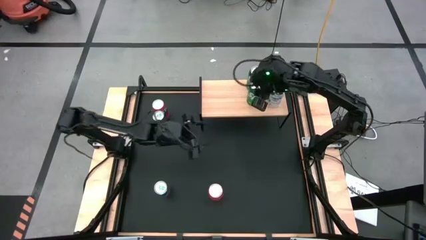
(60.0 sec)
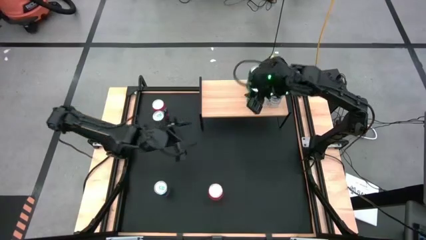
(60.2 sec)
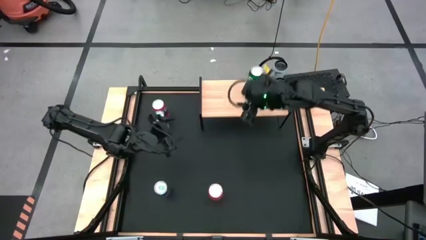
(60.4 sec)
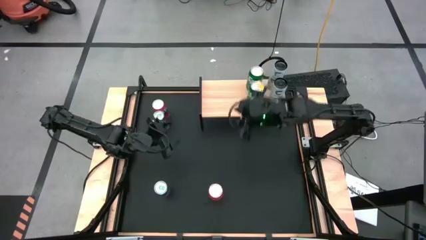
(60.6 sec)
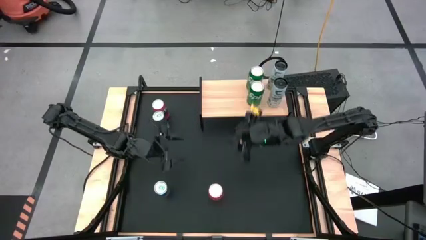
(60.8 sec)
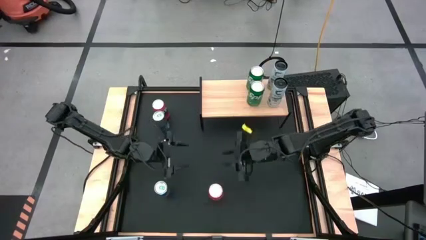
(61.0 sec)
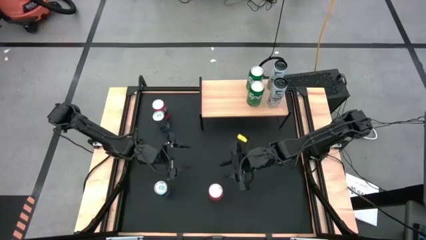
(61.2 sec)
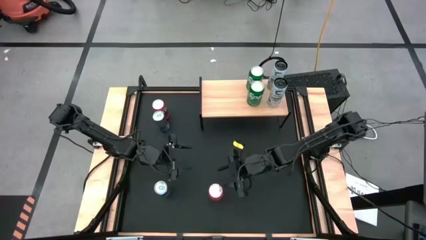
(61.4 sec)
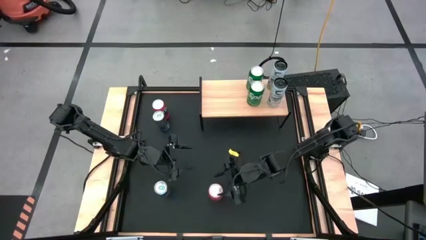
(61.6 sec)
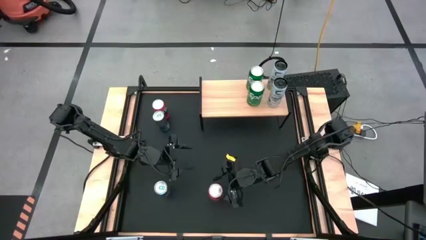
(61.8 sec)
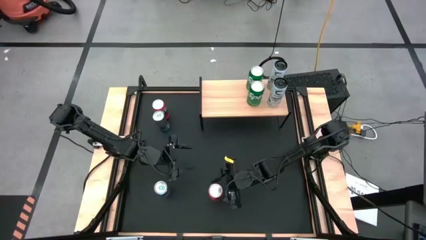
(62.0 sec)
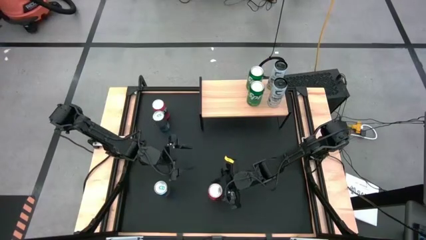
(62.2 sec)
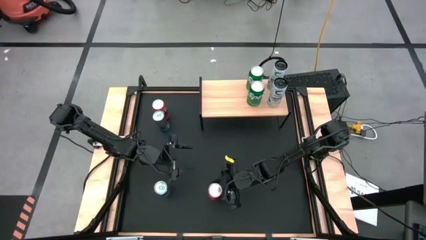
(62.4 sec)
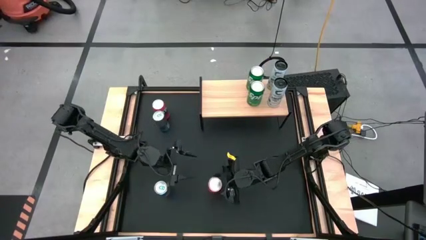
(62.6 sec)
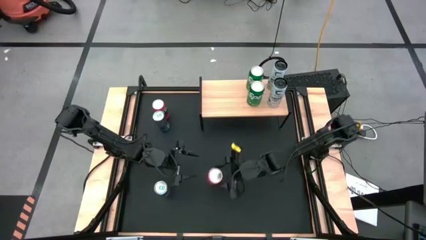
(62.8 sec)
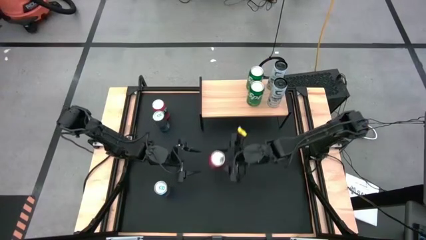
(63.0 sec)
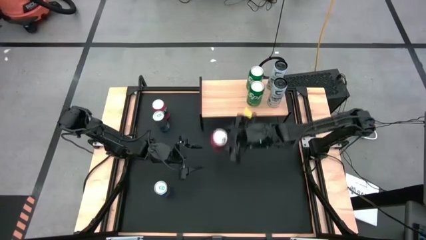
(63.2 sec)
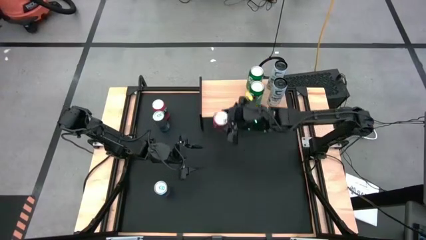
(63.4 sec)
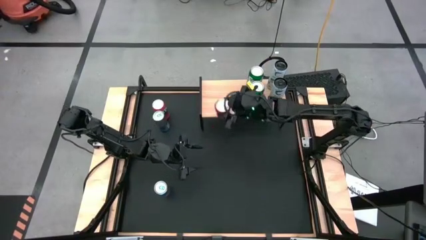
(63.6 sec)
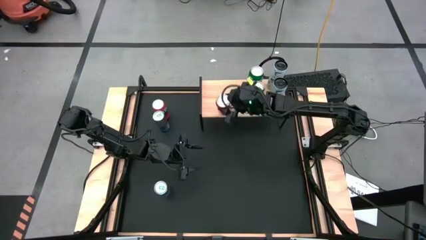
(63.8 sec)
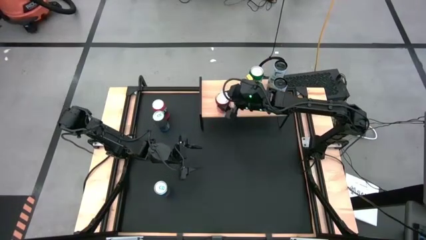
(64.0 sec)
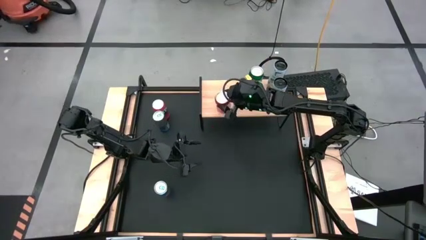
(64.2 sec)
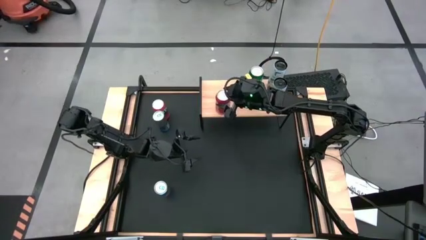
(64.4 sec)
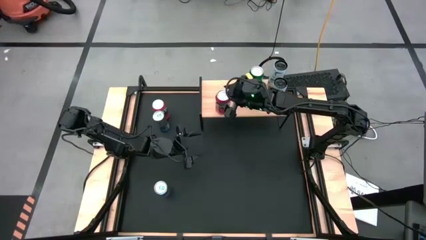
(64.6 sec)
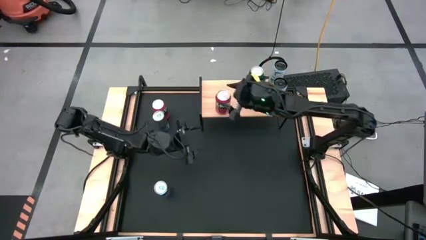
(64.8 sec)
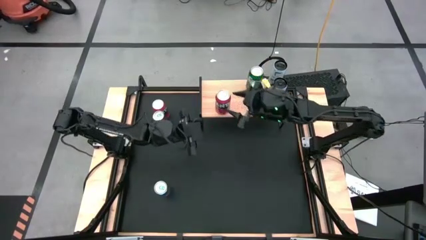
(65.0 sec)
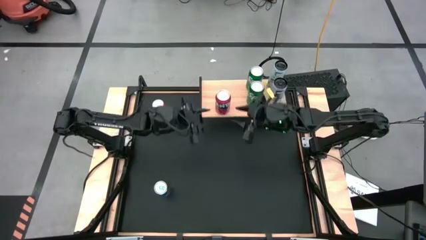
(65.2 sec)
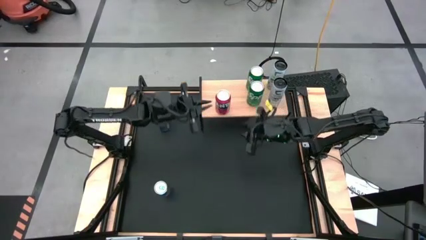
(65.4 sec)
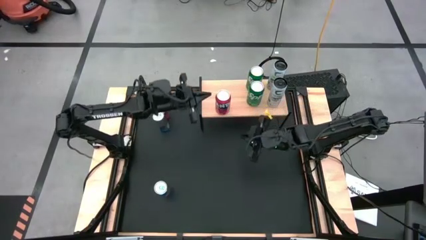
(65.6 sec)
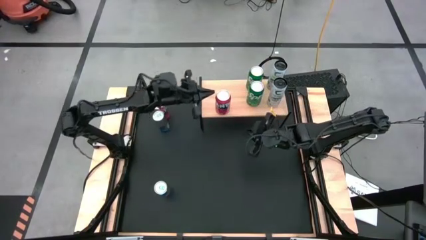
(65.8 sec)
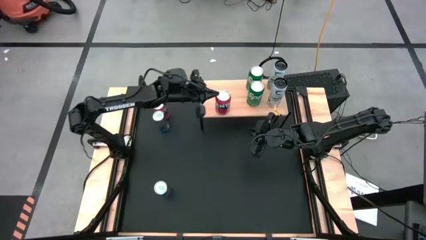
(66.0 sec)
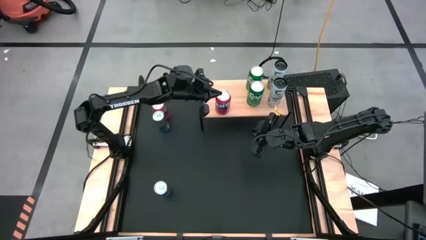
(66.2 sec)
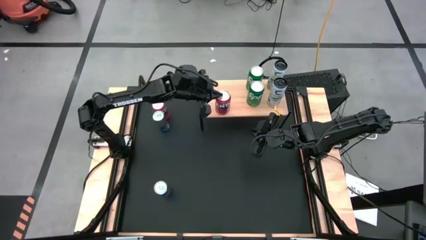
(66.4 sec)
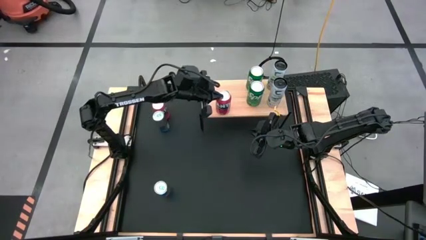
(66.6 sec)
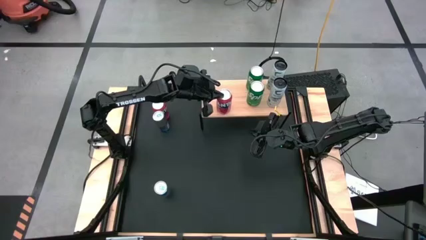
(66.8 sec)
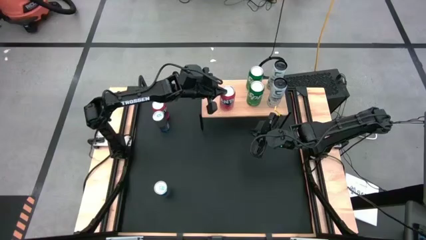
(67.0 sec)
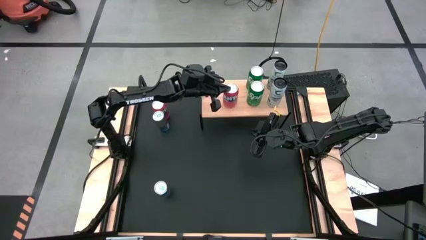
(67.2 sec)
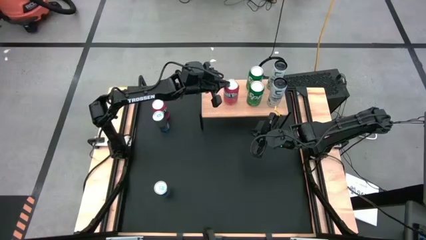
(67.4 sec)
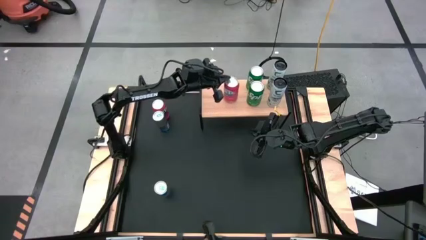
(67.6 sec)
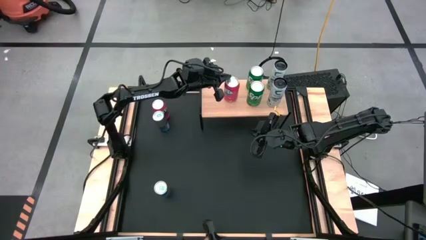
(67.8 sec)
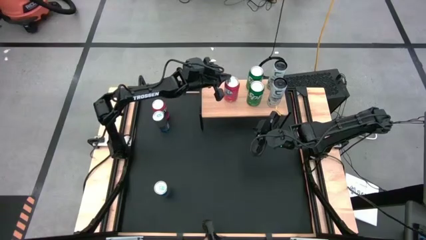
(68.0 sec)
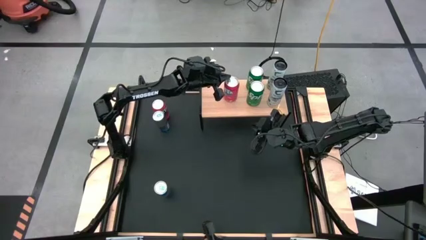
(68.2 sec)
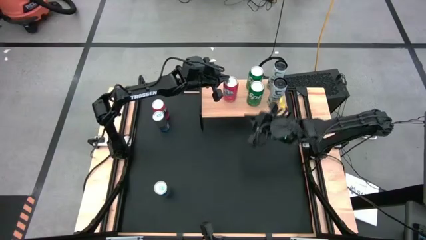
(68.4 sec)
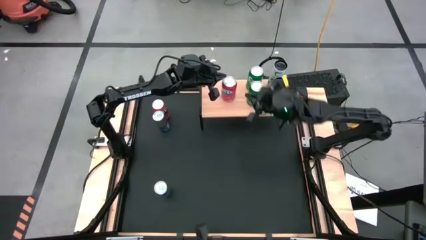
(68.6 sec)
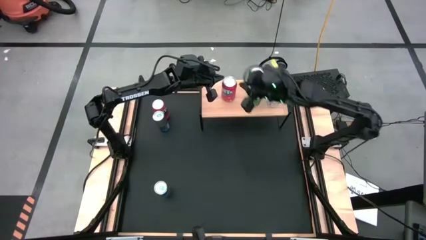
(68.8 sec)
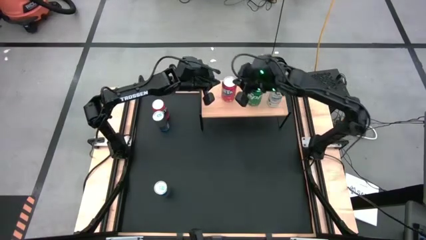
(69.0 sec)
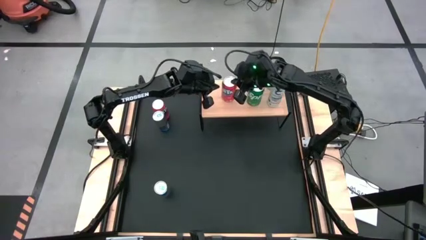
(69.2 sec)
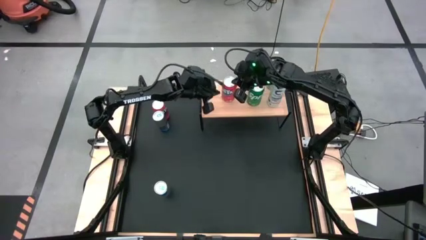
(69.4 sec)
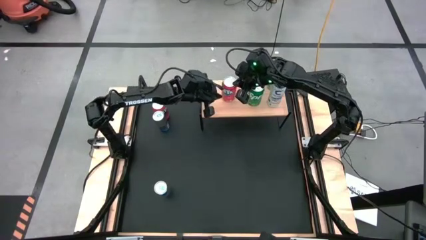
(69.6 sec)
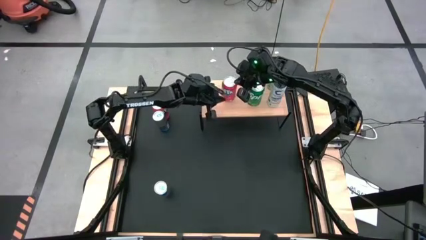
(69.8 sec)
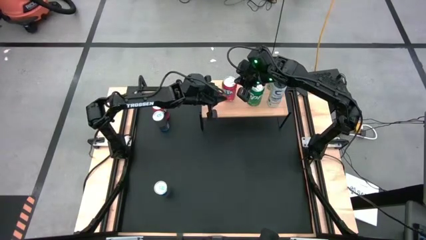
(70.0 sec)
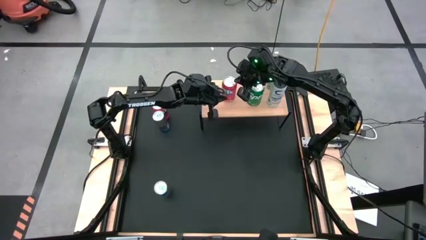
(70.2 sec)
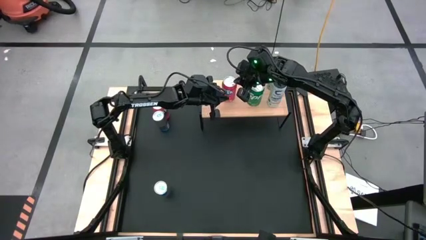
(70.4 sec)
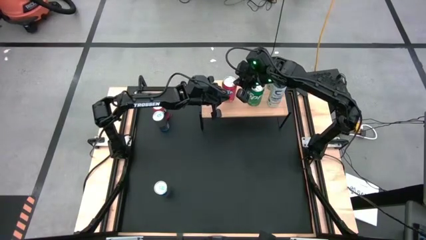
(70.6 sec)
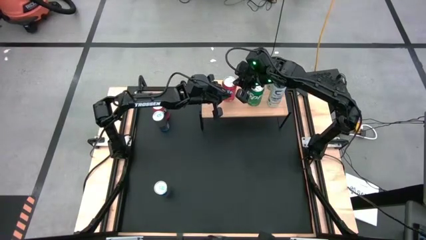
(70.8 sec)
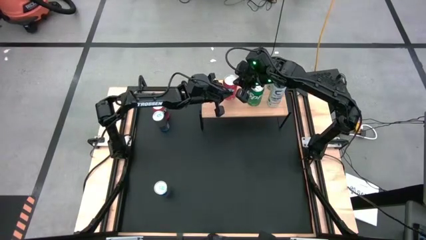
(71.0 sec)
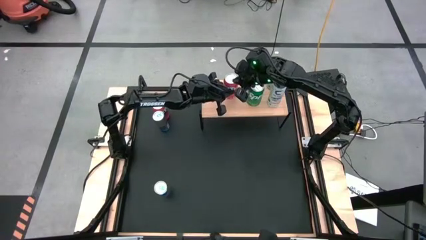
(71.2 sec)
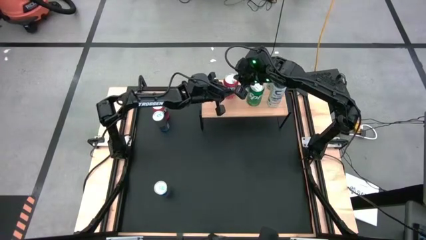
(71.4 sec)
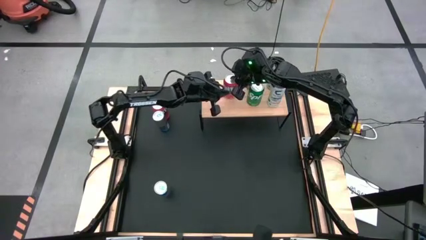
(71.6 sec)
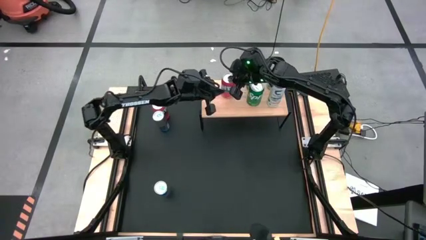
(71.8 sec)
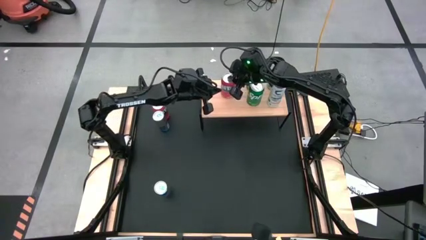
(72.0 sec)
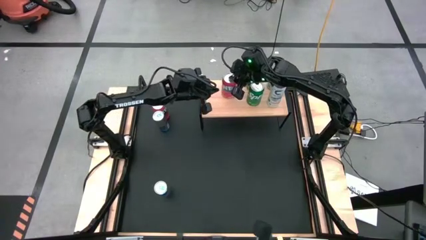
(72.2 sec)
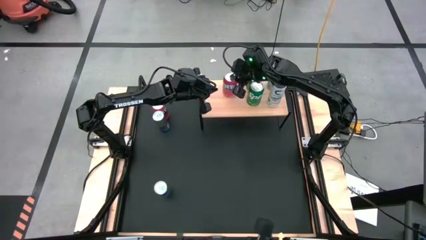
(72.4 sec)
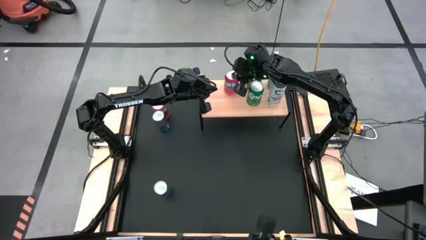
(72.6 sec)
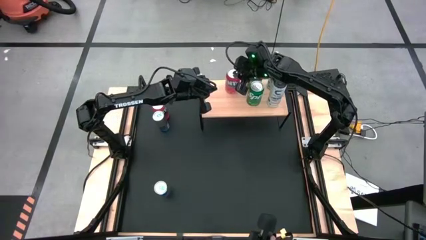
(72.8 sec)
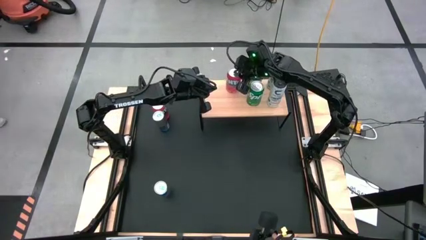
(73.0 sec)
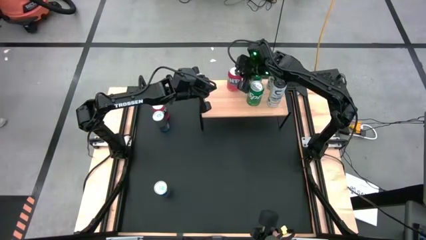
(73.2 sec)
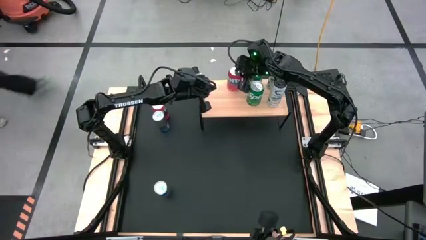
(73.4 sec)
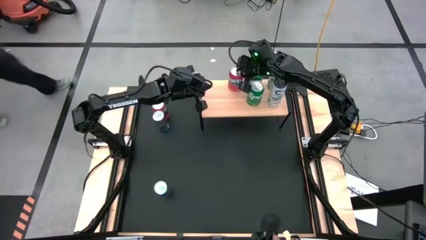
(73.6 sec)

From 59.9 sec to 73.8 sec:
Task: Place canned beverage on shelf
Put the bottom orange soda can on the shelf

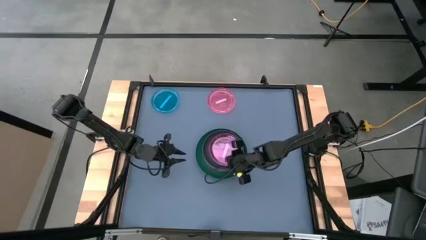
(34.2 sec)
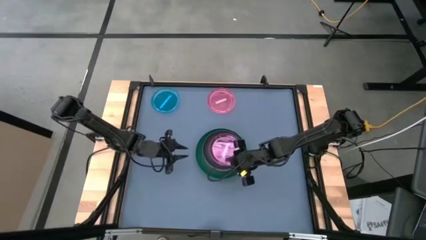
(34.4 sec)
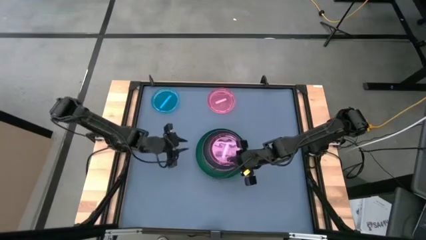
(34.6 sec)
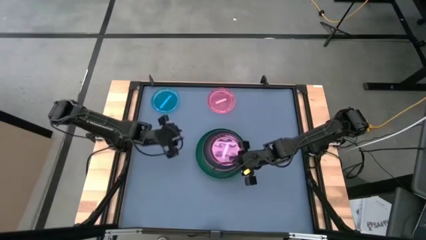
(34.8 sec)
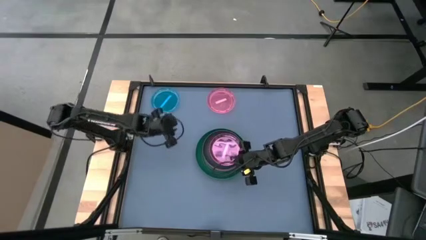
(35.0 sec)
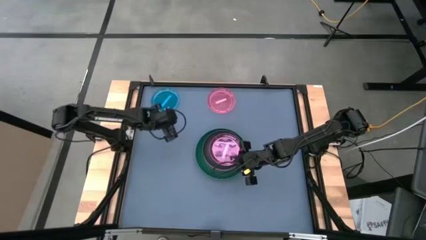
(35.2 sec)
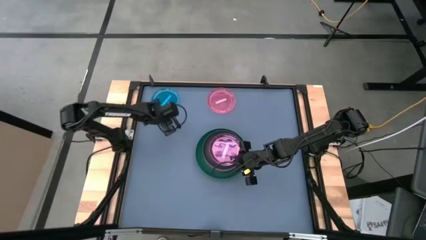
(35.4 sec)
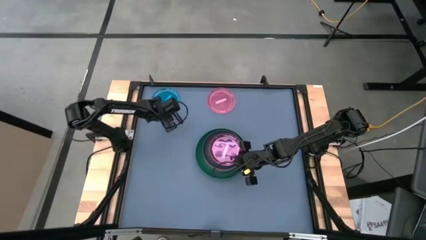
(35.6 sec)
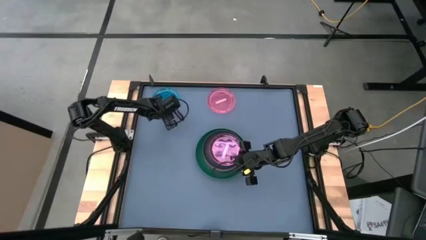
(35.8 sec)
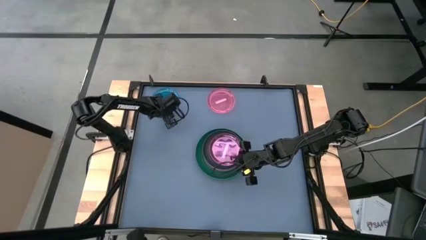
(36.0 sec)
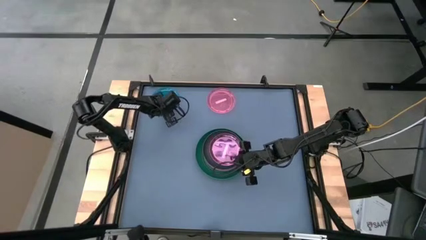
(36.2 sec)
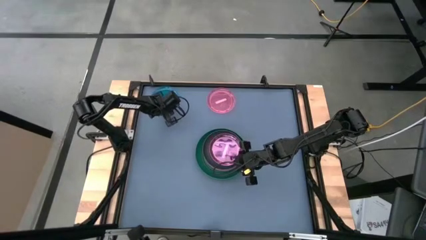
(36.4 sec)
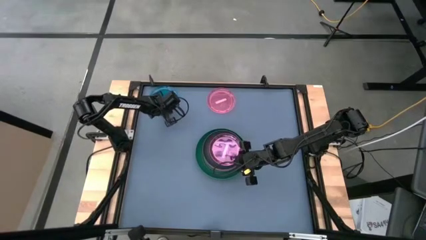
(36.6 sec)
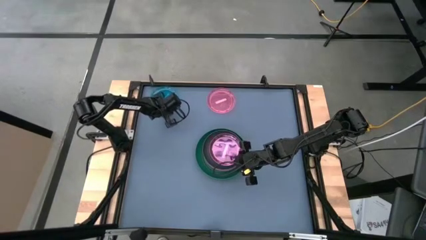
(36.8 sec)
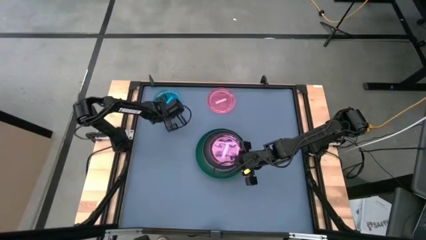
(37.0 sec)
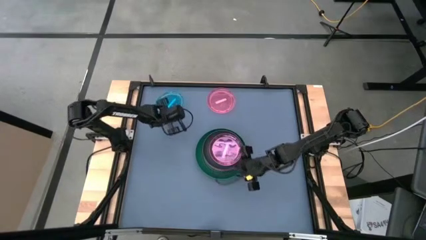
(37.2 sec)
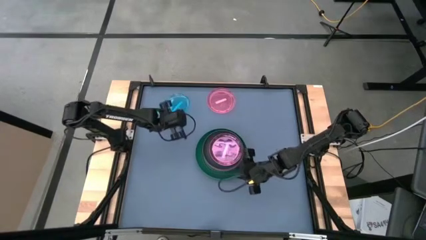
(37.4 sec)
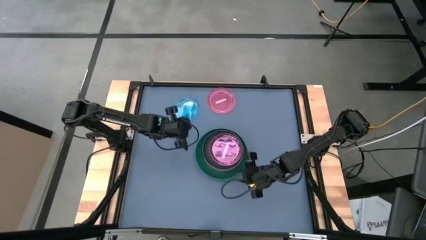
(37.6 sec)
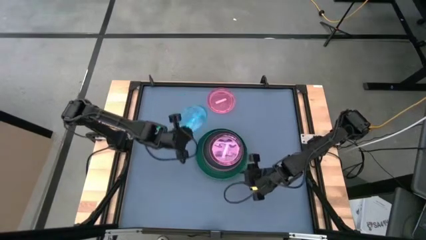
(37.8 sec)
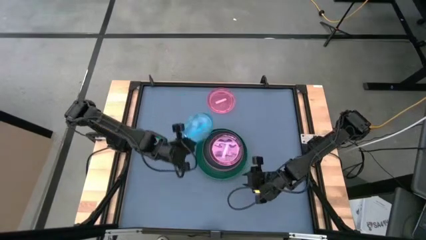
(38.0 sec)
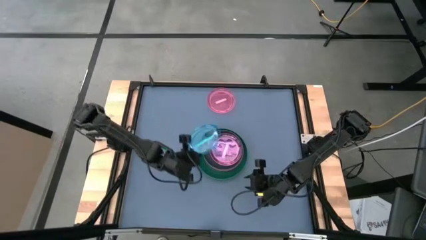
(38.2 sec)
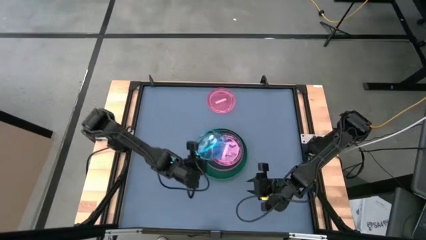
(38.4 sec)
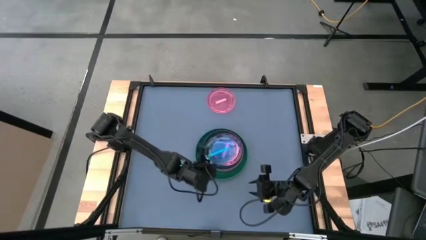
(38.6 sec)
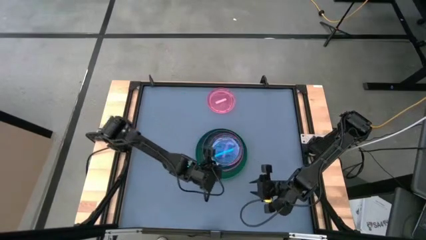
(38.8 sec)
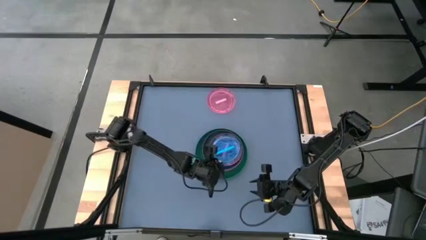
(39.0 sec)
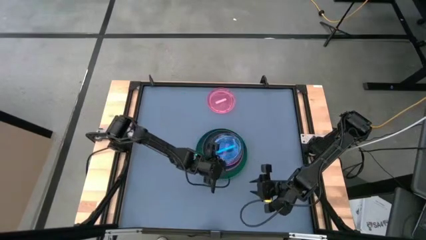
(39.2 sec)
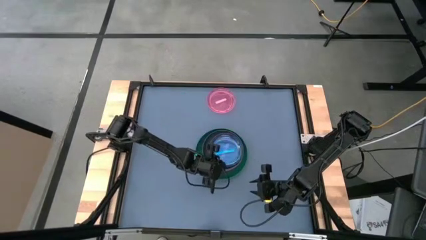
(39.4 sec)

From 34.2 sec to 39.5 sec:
Task: Stack plastic plates
Stack the blue plate on top of the pink plate
